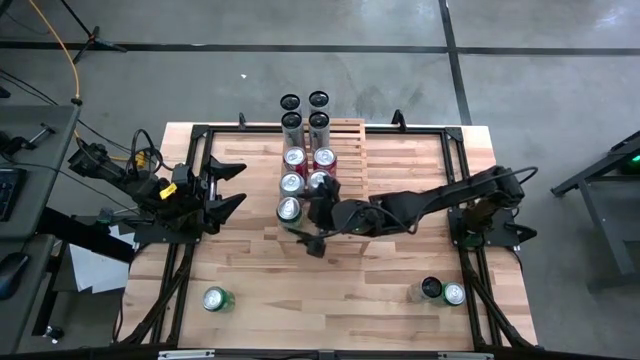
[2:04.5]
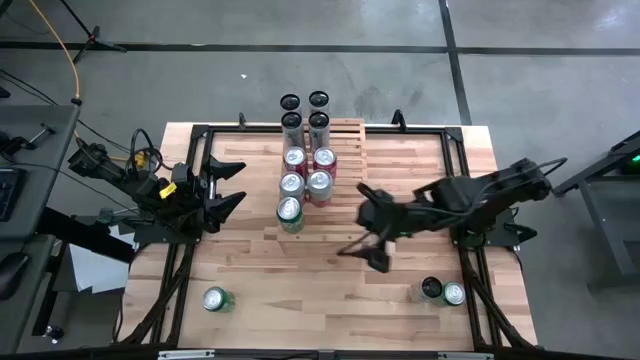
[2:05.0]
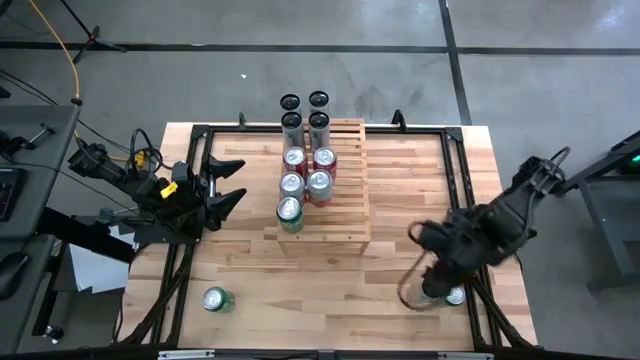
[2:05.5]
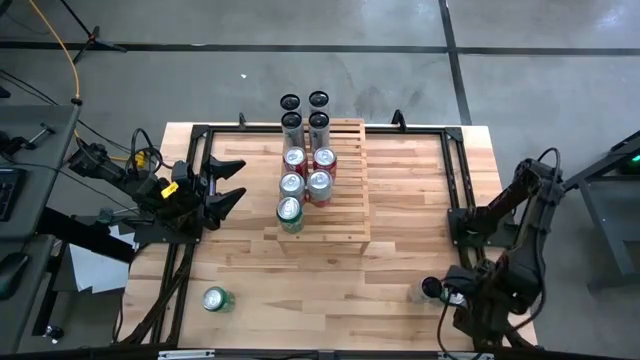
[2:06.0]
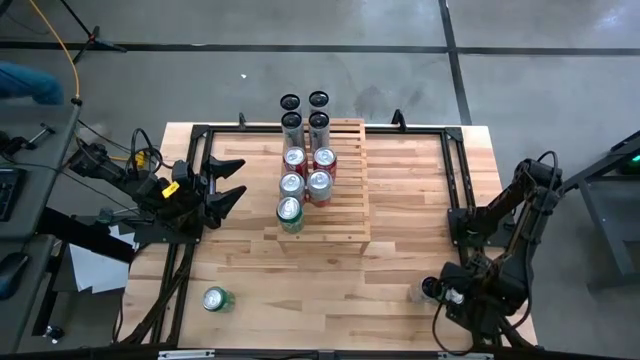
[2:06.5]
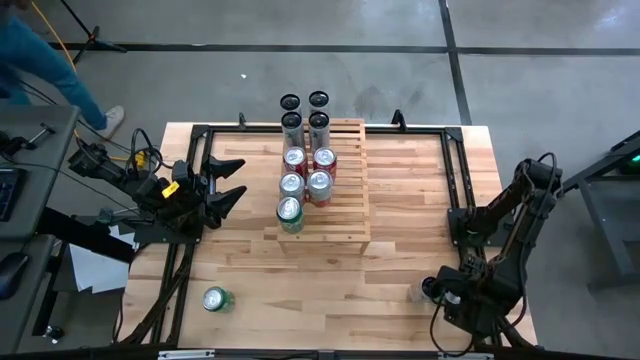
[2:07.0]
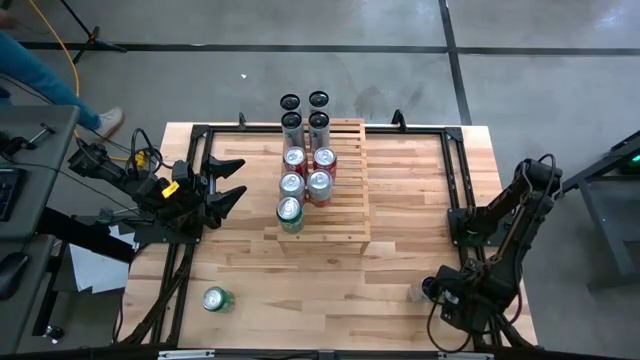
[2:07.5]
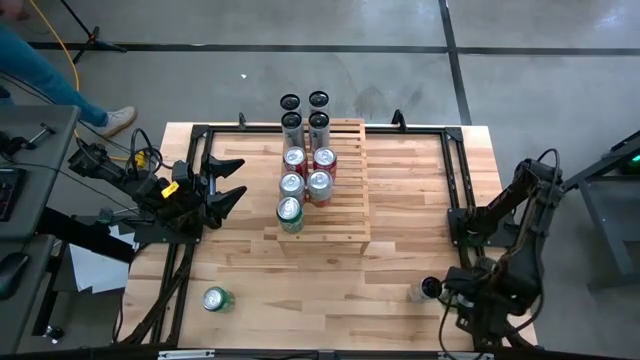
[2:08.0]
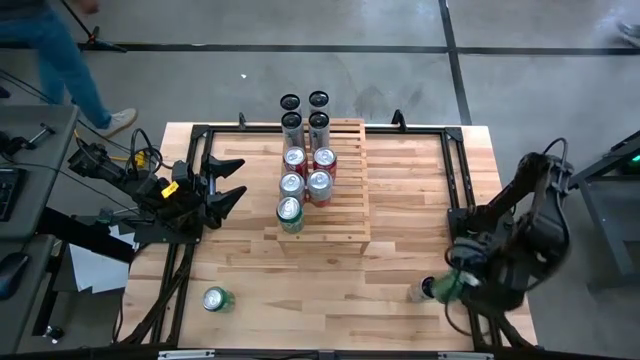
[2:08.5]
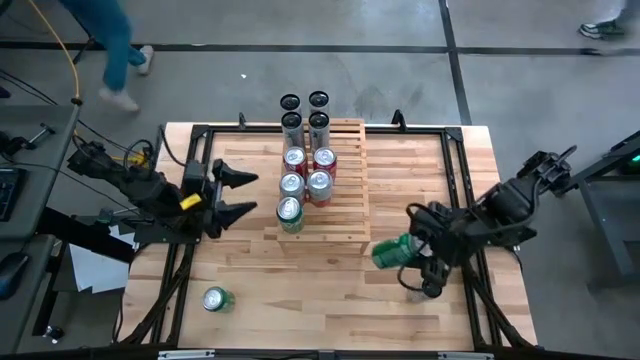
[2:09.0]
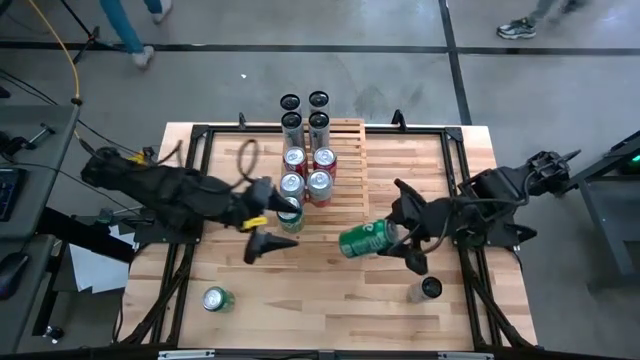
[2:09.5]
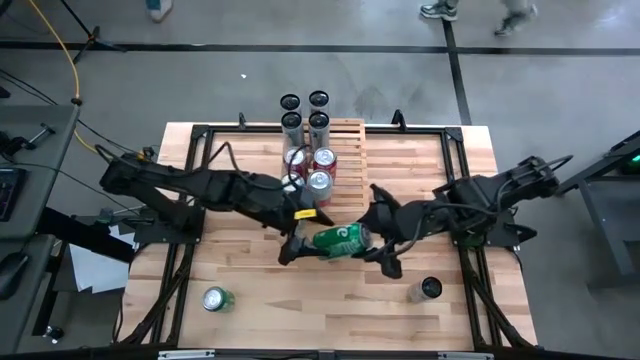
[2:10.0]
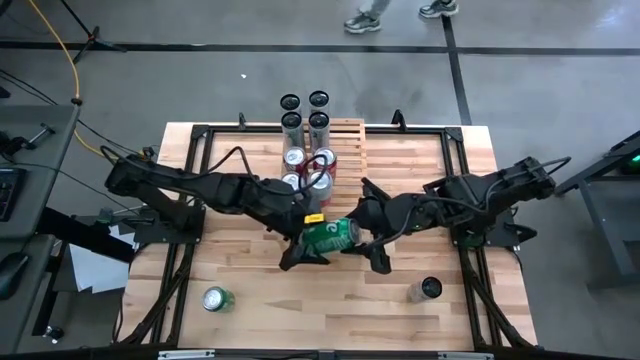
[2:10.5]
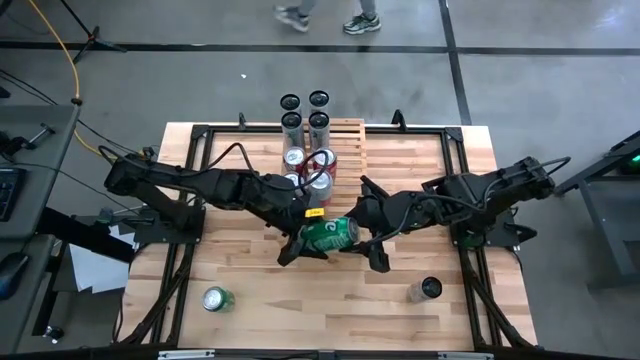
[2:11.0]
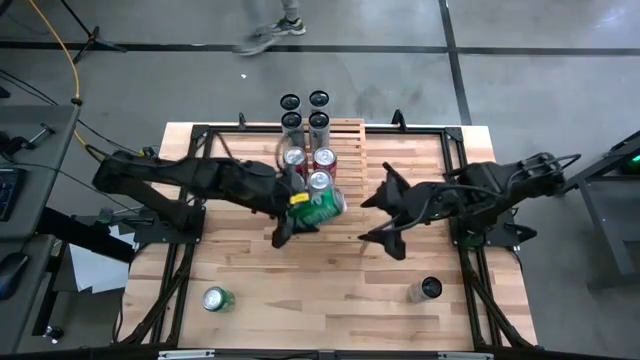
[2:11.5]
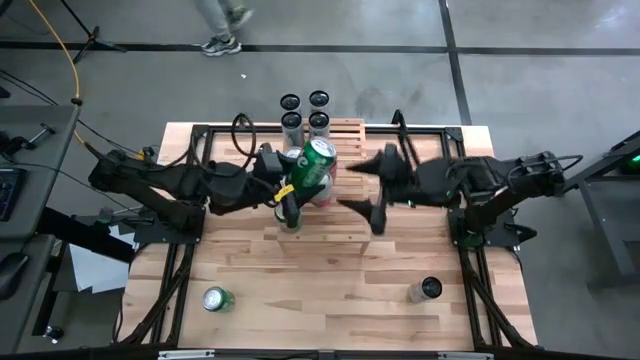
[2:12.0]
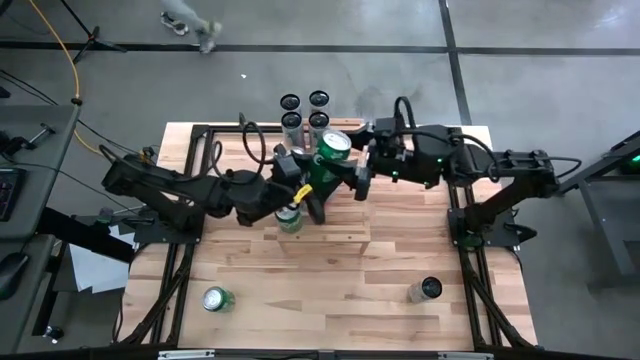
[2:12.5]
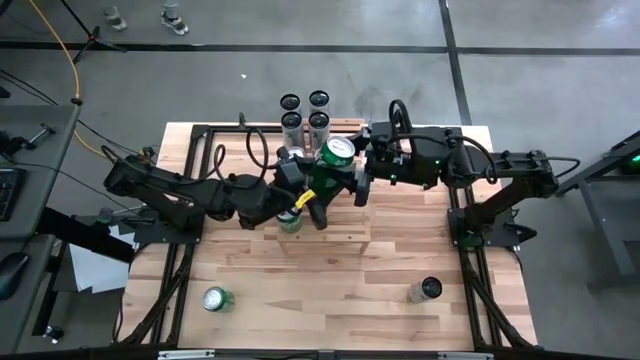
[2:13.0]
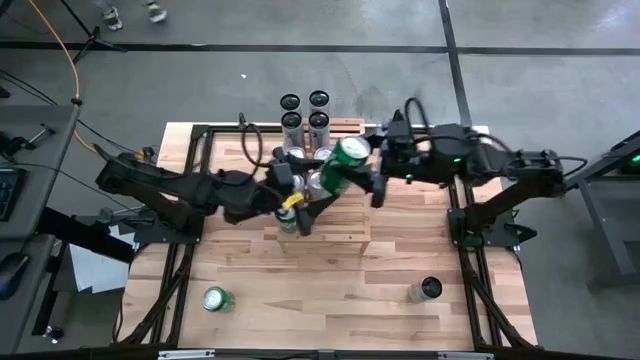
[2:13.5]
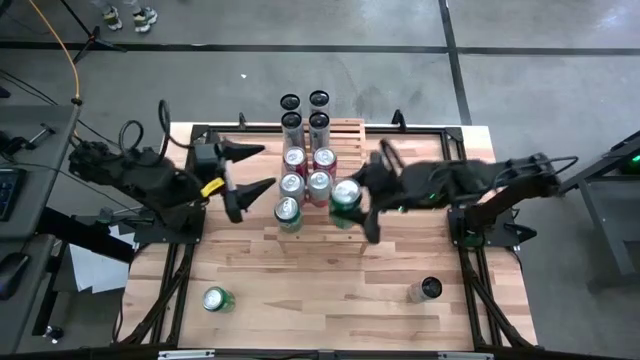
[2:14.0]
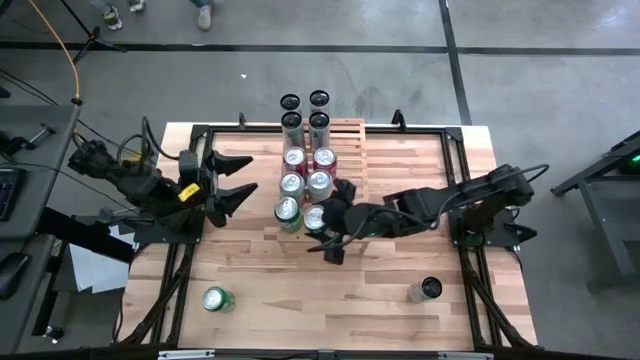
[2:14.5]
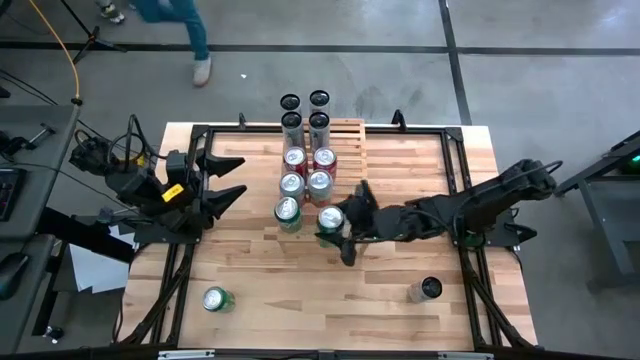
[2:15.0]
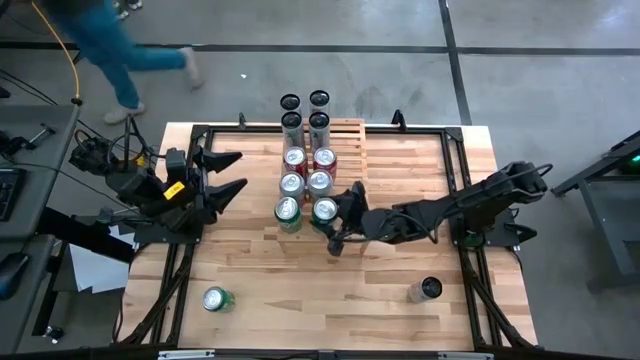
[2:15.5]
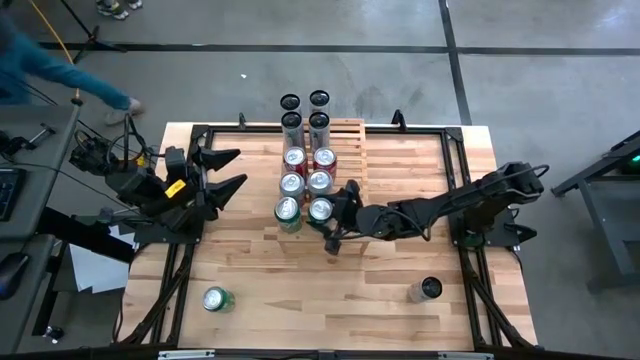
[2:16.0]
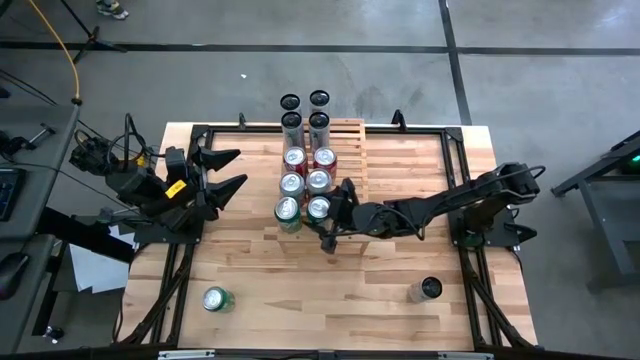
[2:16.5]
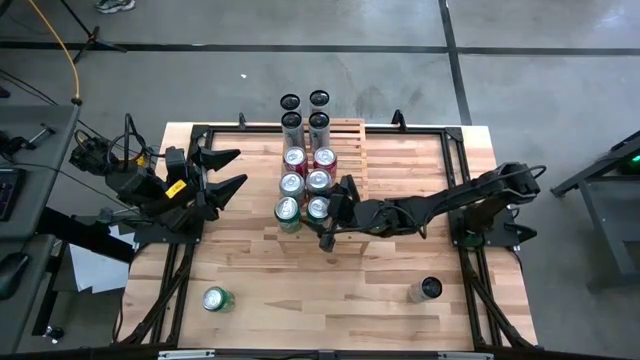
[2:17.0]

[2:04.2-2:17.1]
Task: Place canned beverage on shelf
Put the bottom right green soda can on the shelf aligned with the other green soda can

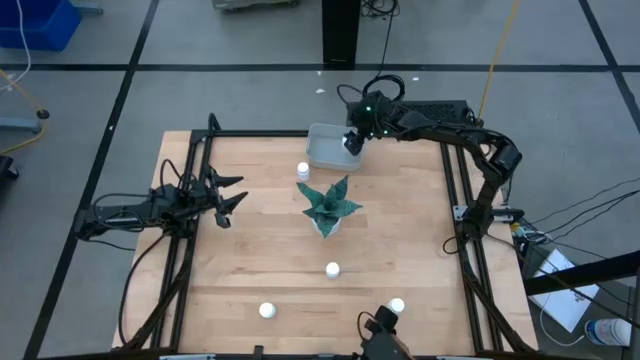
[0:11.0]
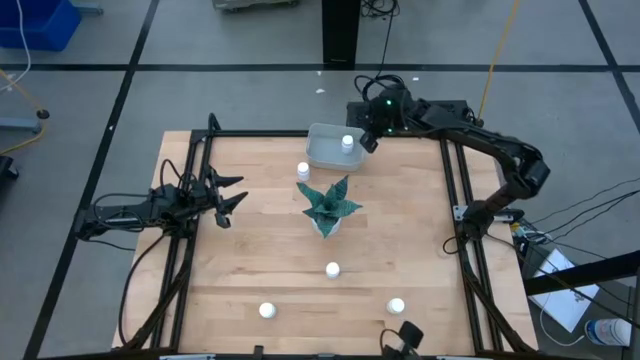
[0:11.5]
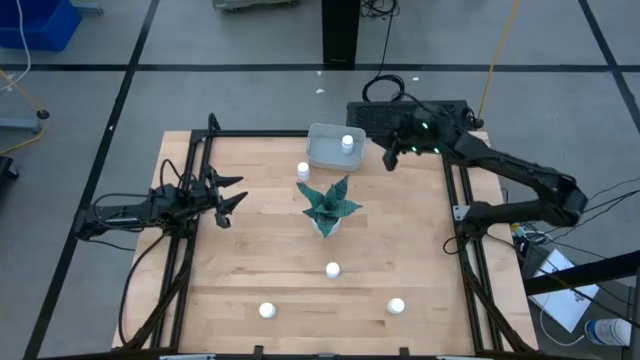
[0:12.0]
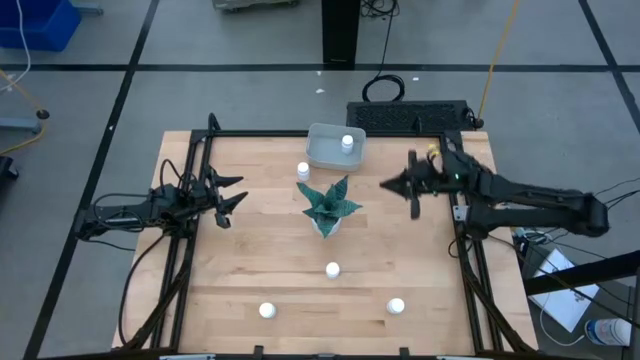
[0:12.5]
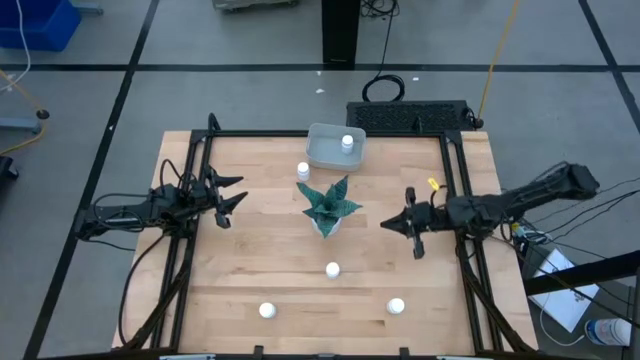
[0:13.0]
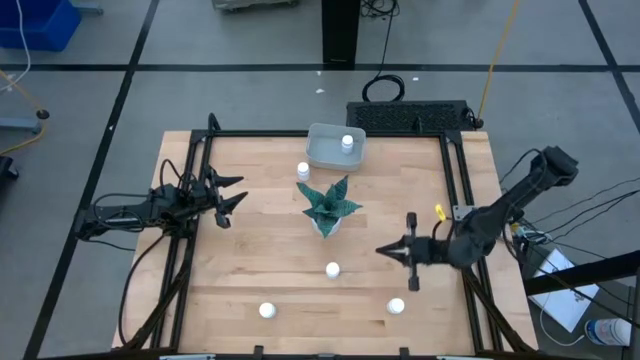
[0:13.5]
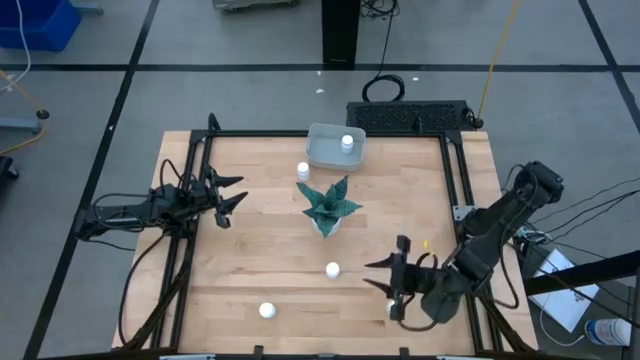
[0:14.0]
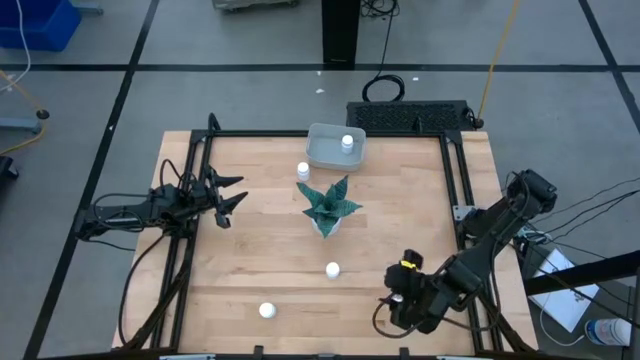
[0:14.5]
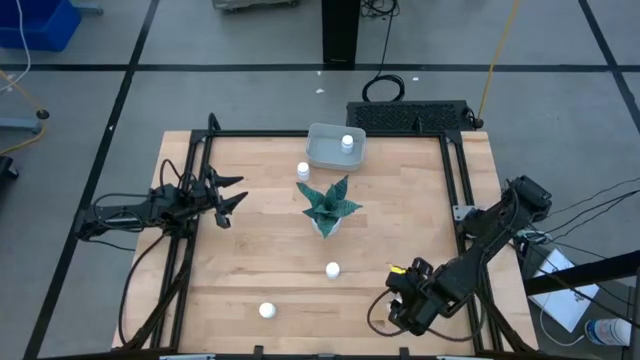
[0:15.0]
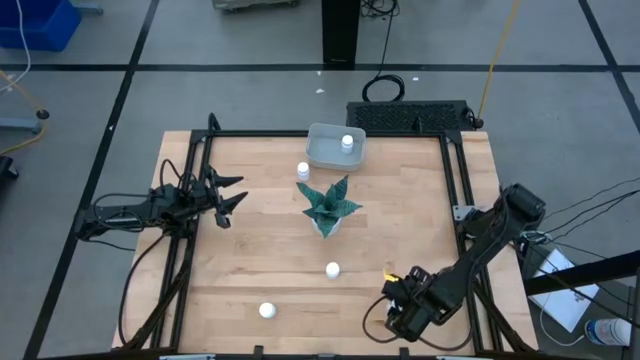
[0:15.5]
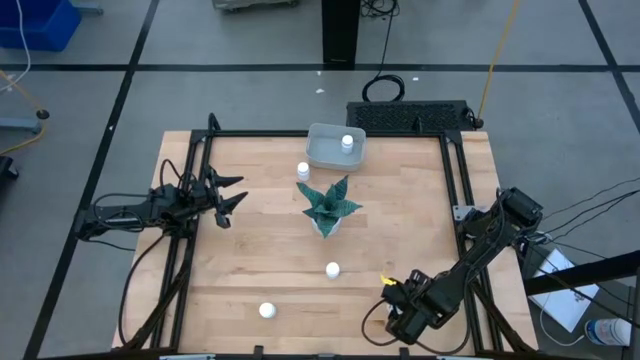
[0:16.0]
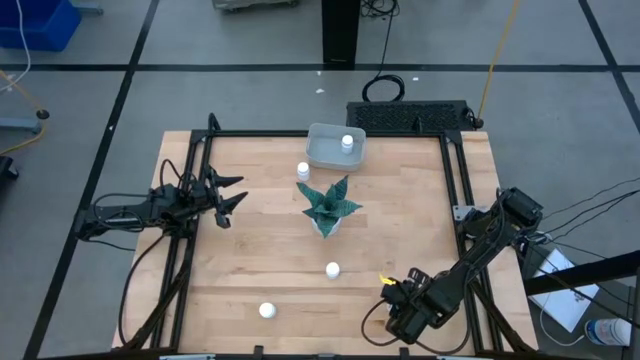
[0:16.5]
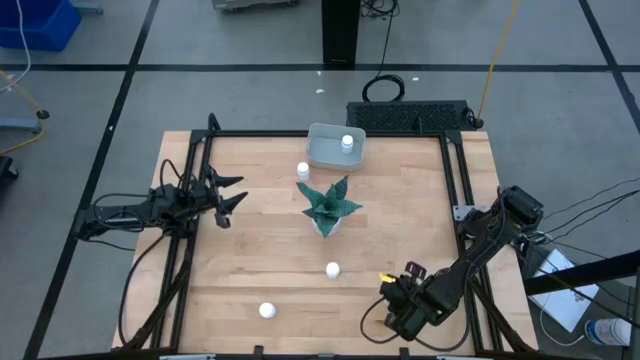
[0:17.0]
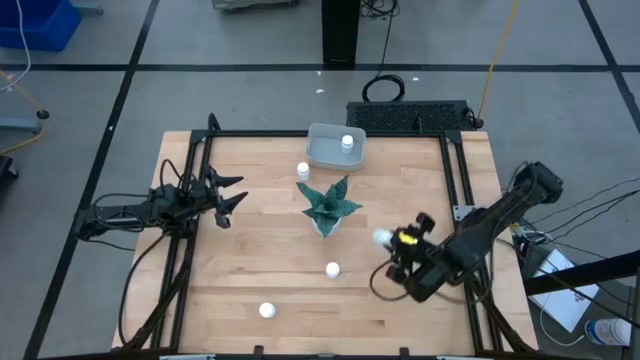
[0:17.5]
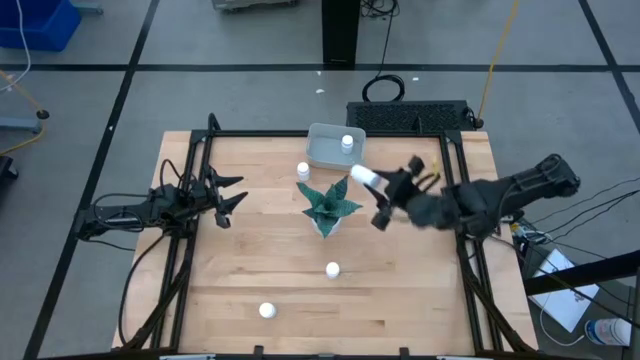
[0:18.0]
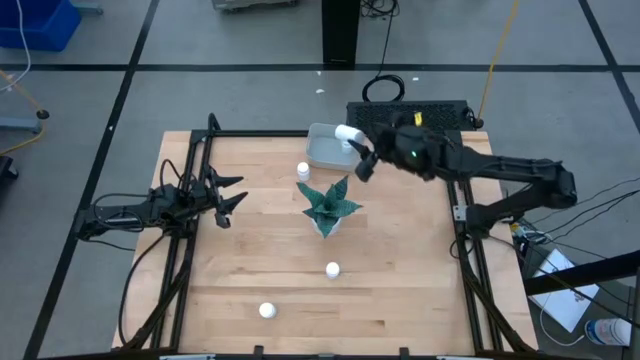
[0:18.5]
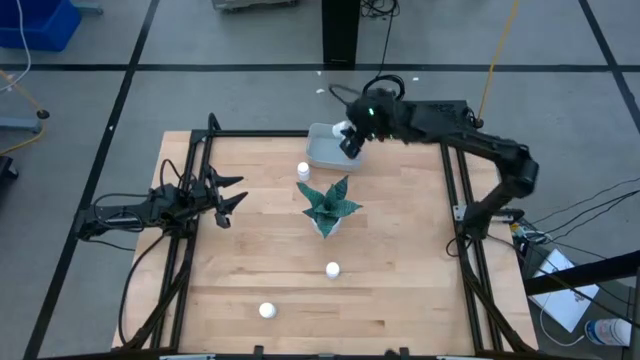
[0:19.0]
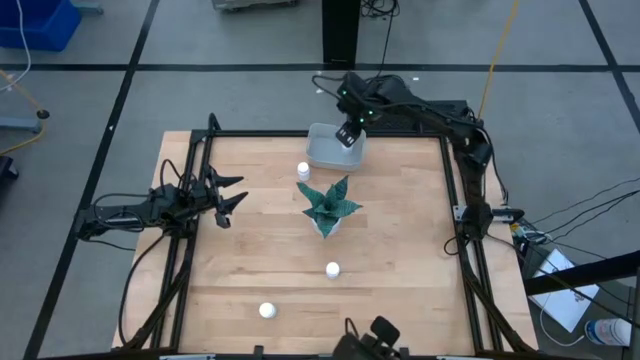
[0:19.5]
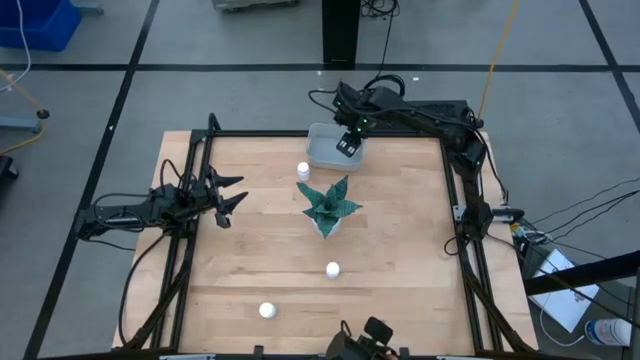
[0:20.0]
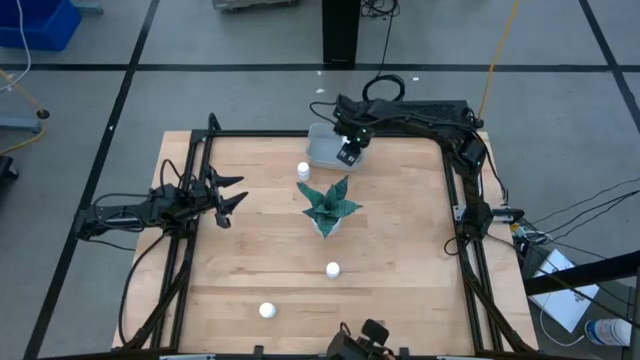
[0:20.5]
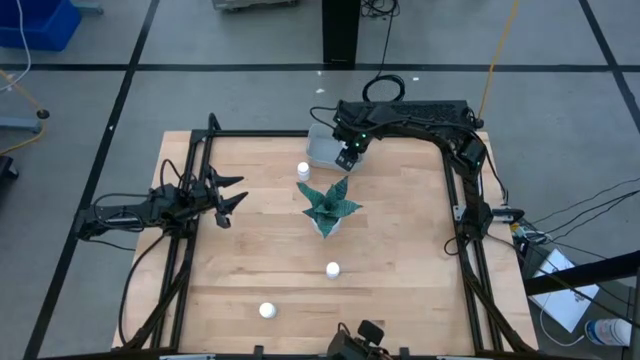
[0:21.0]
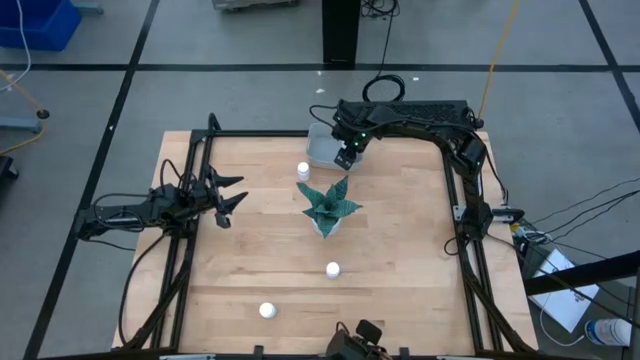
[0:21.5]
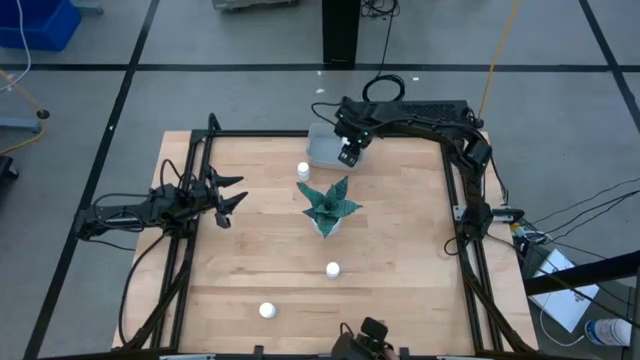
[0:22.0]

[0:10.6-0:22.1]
Task: Pick and place pill bottles into a basket
Put the white medicine bottle into the gray bin
